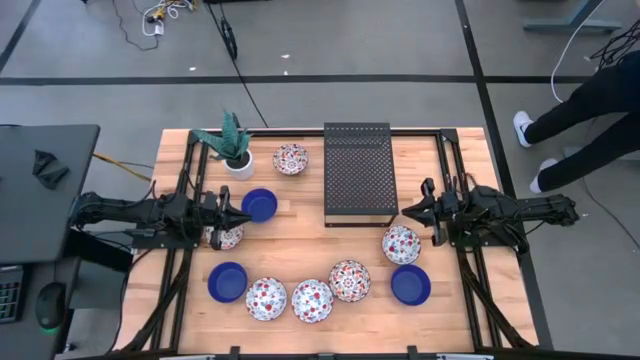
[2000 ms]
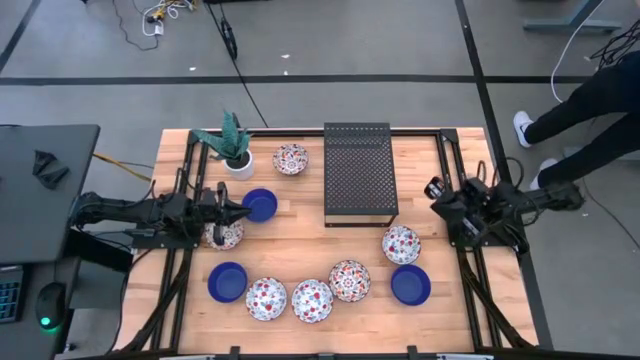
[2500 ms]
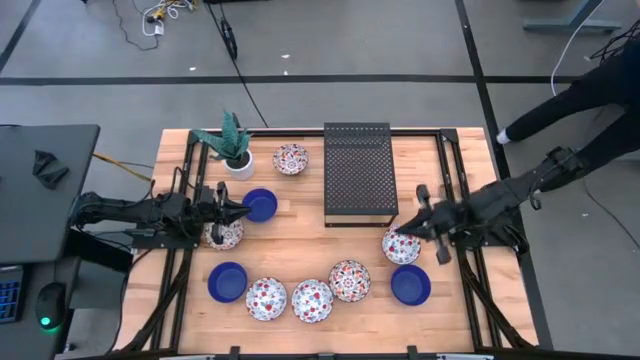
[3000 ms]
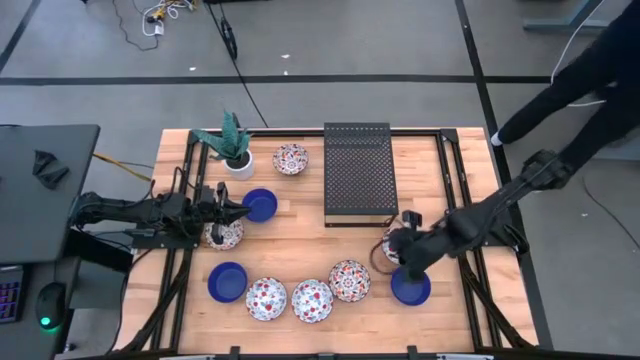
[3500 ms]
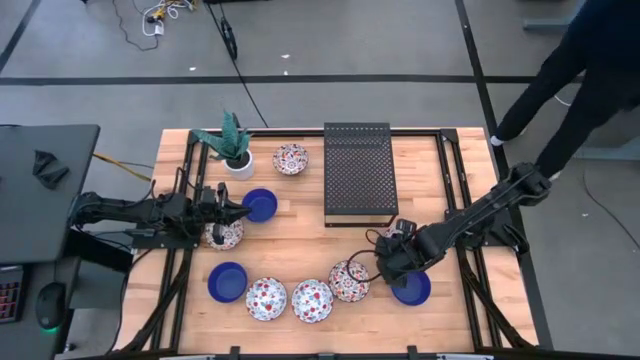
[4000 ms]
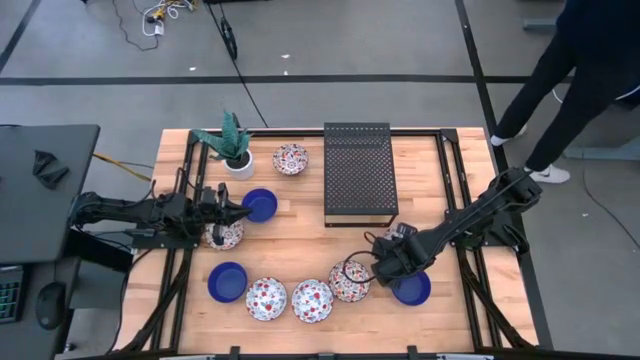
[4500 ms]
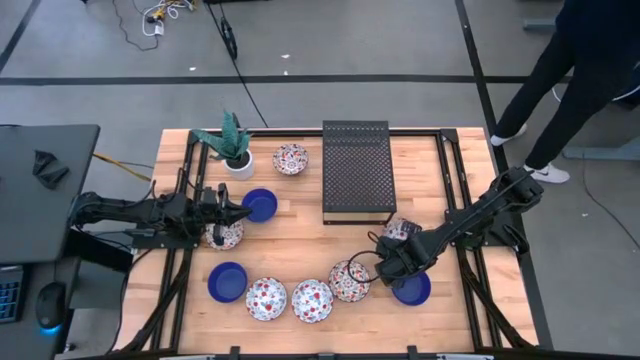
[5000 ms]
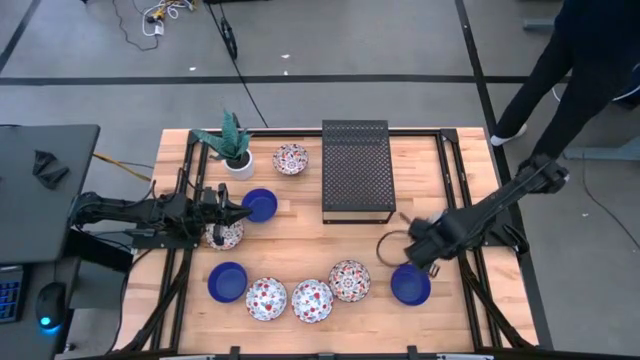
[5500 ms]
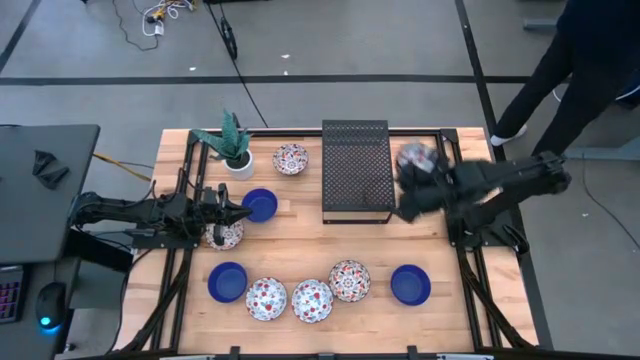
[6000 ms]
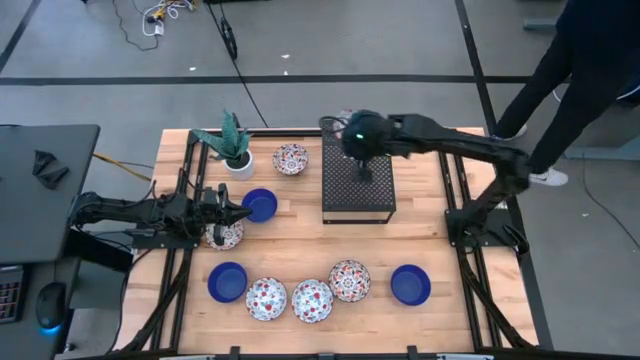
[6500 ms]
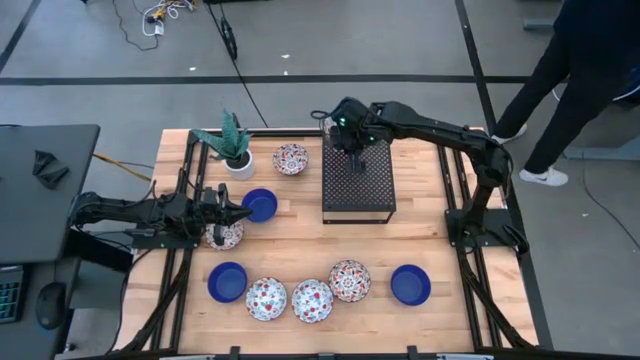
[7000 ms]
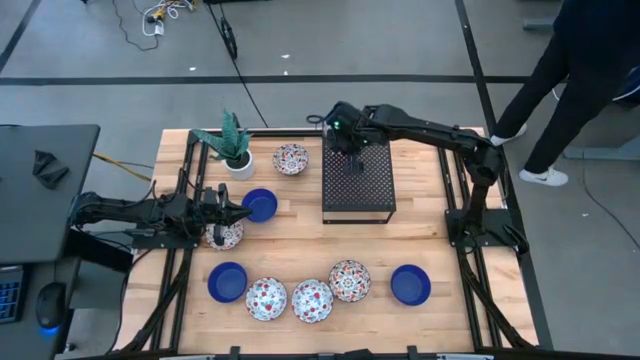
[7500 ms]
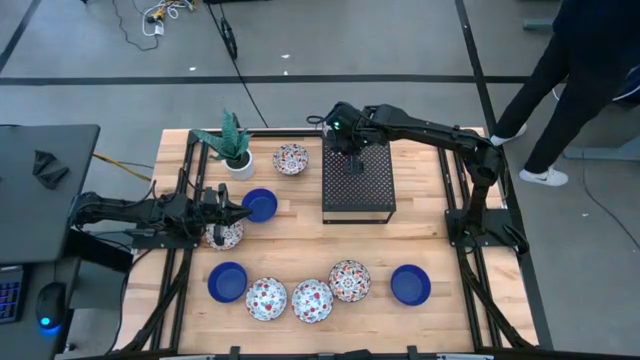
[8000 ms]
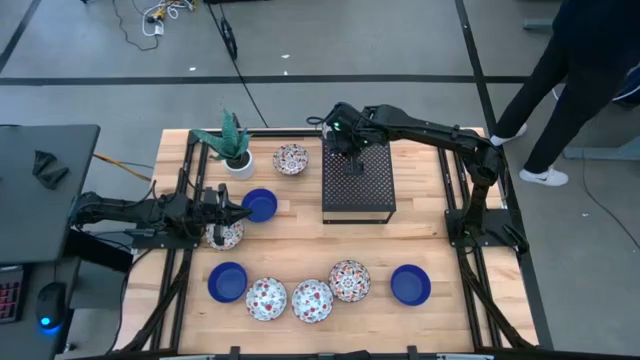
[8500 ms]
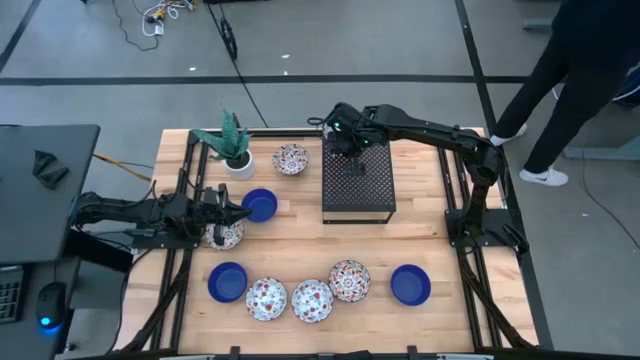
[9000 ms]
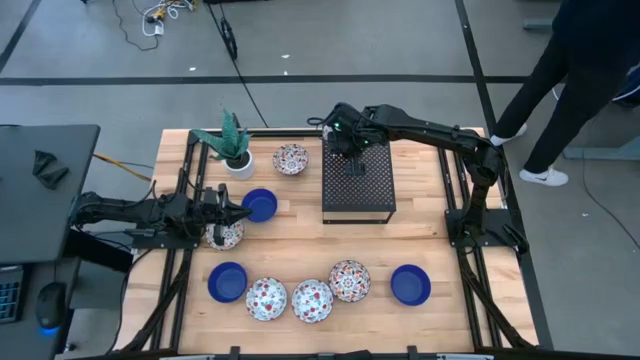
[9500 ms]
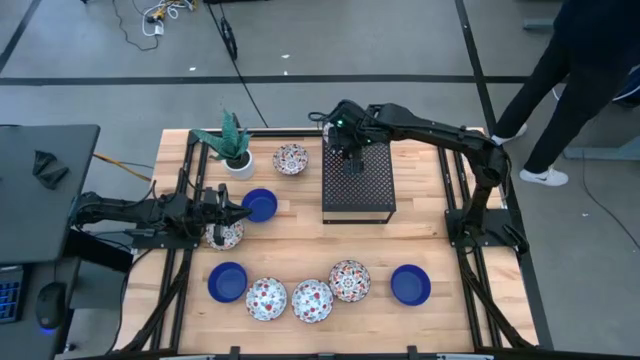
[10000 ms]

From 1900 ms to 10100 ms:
Task: Pick & Place Mini bowls
Put the right red white bowl on the shelf

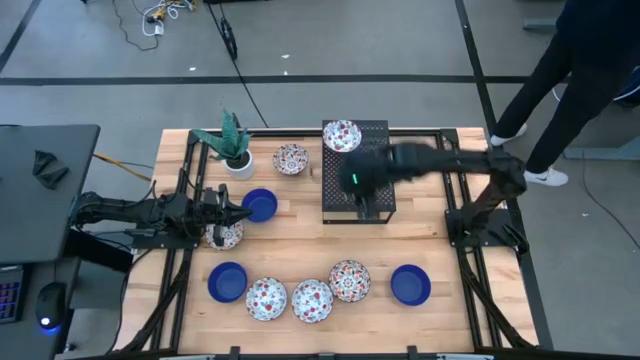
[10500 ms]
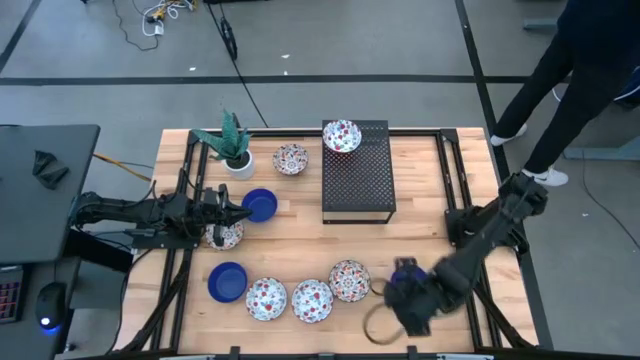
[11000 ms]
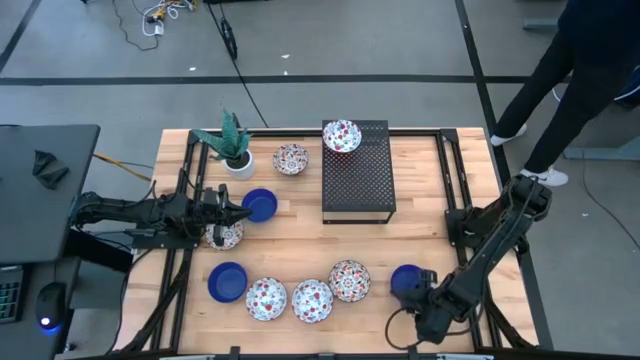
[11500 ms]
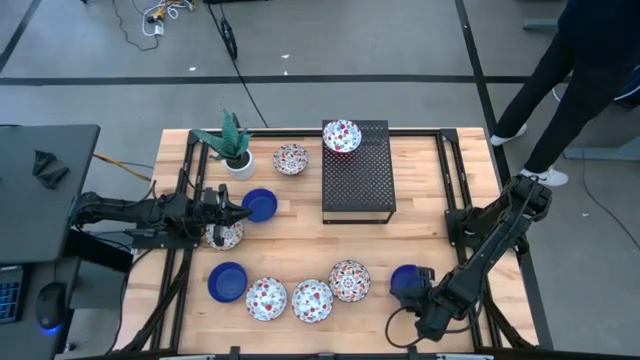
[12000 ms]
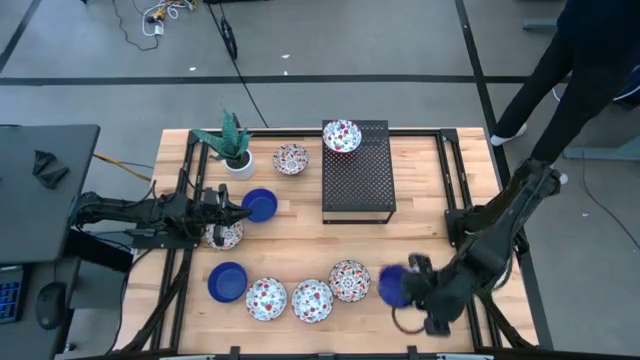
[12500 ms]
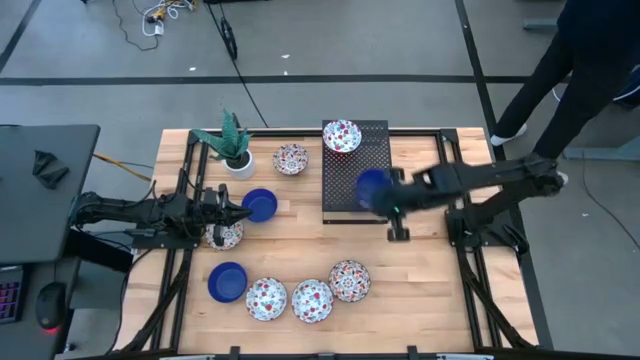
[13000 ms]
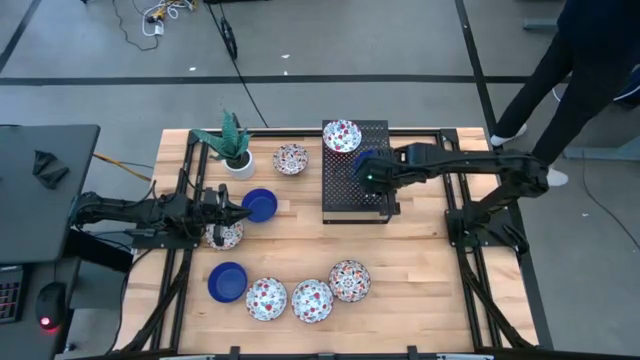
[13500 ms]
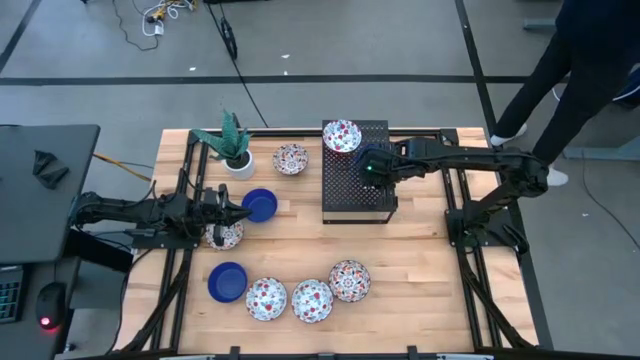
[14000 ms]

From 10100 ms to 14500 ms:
Put the bottom right blue bowl on the shelf

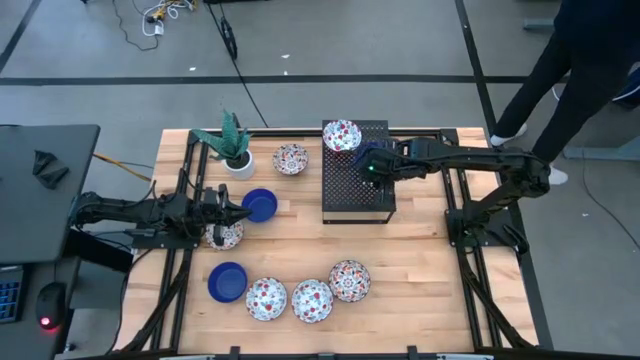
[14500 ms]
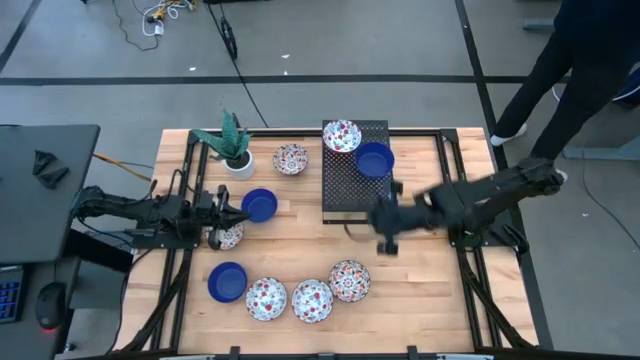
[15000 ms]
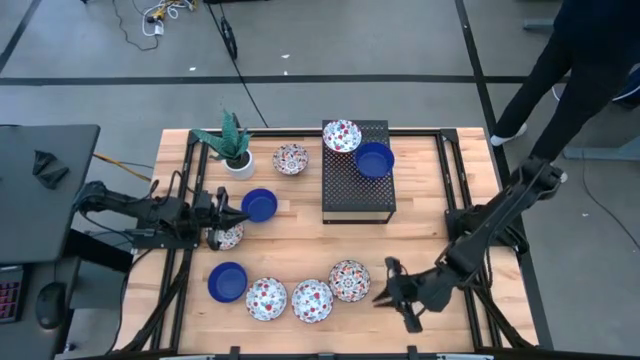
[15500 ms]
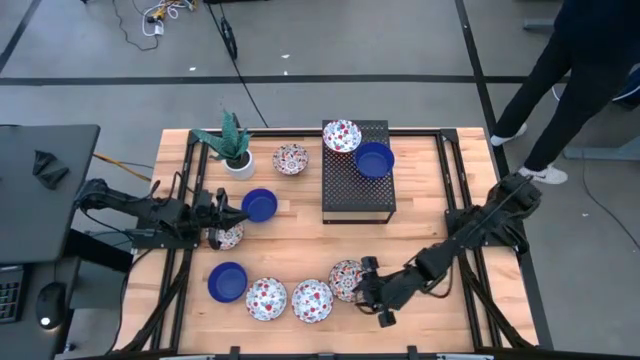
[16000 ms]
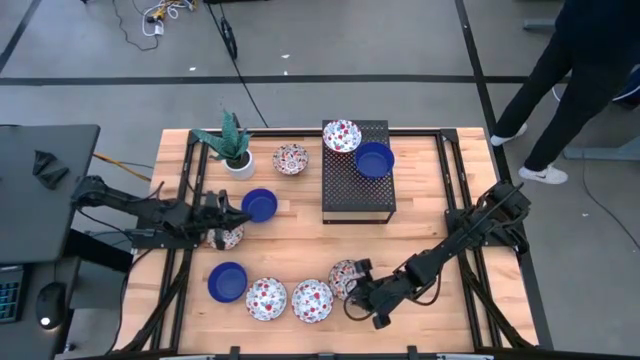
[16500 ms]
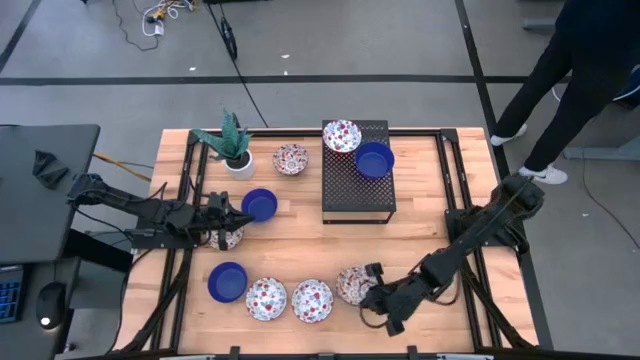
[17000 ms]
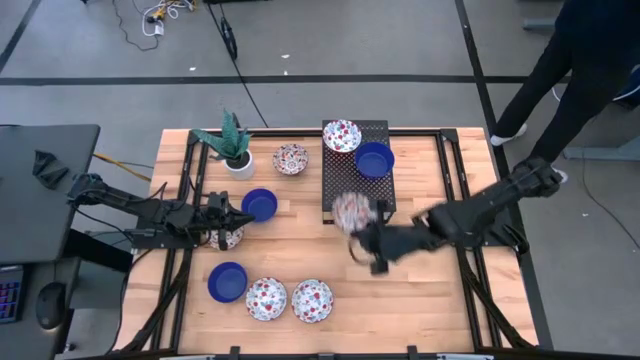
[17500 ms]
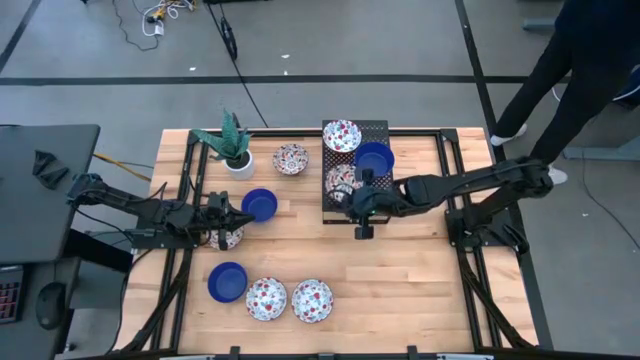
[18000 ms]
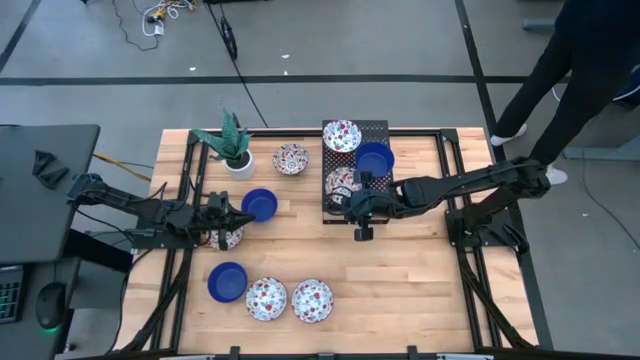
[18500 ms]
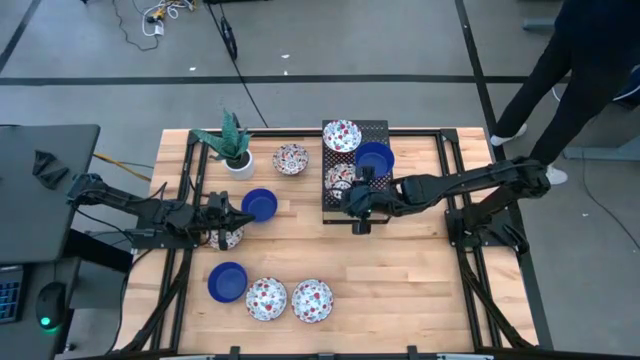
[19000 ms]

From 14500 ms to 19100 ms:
Put the bottom orange white bowl on the shelf

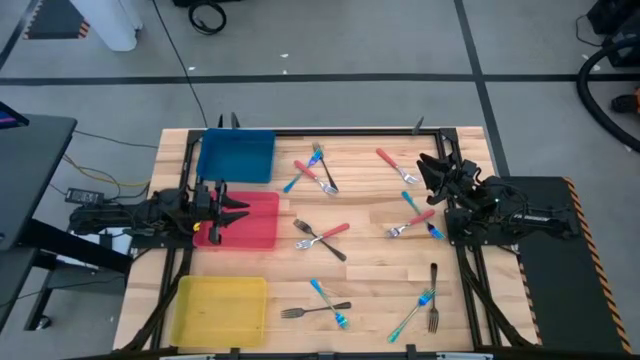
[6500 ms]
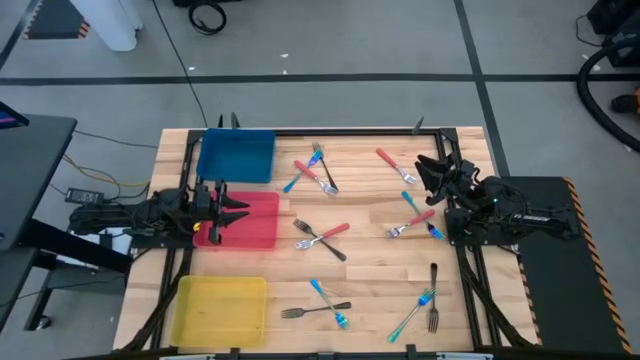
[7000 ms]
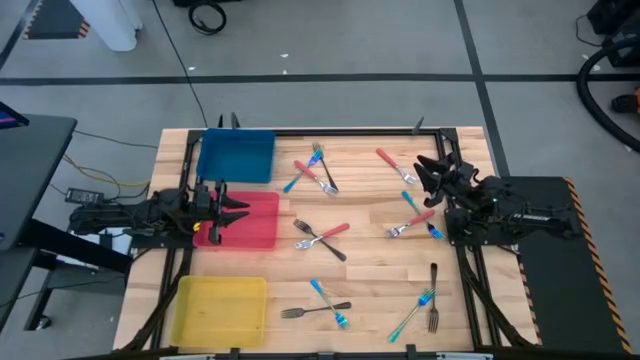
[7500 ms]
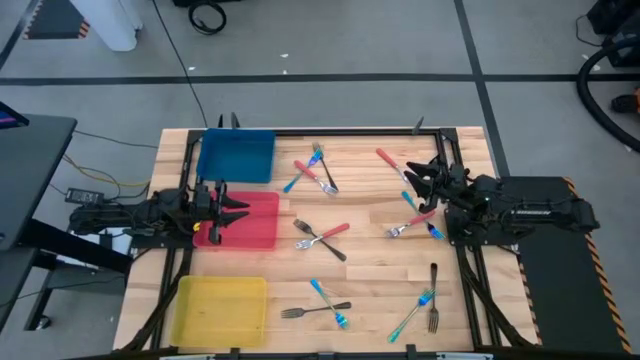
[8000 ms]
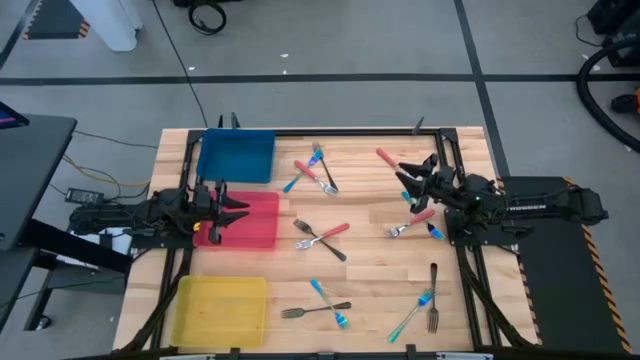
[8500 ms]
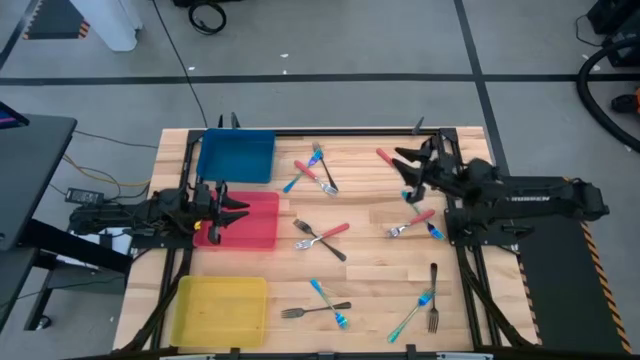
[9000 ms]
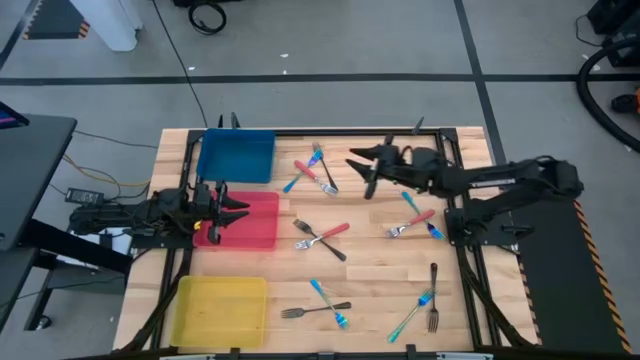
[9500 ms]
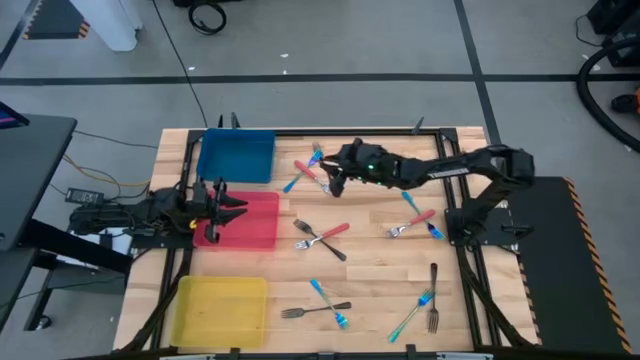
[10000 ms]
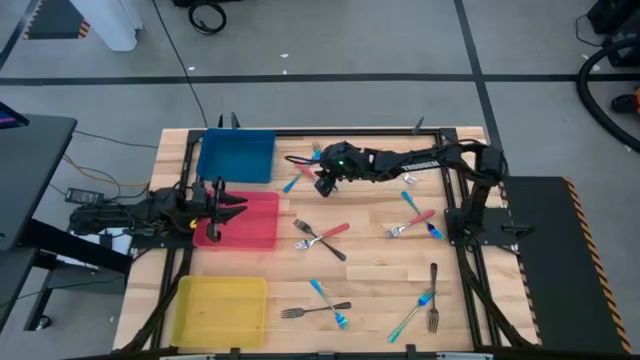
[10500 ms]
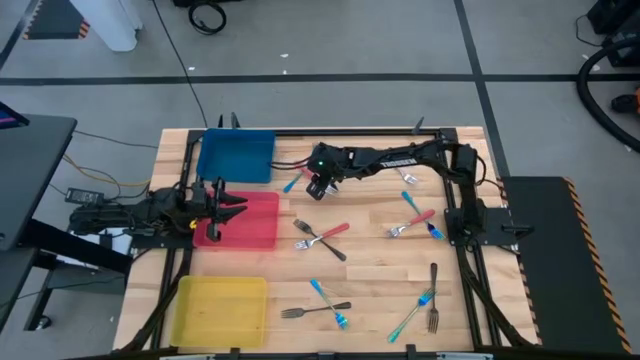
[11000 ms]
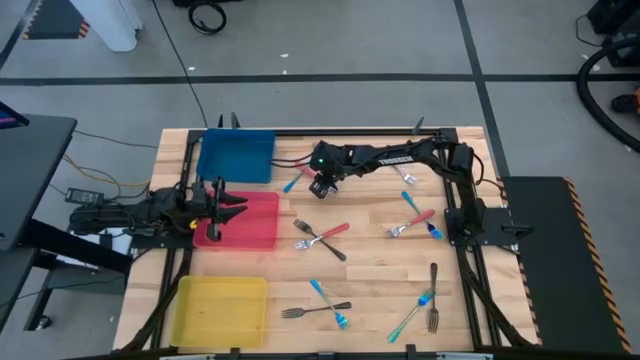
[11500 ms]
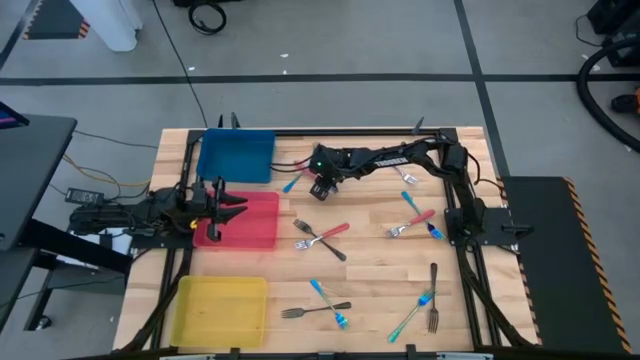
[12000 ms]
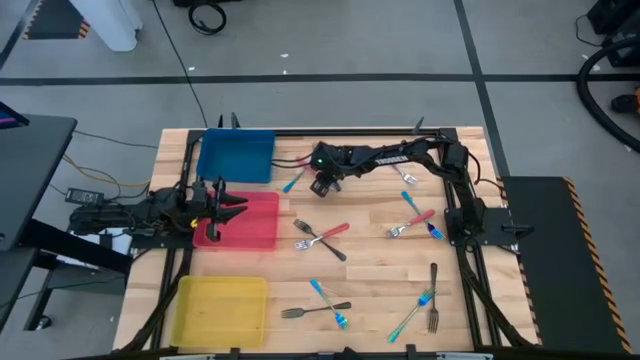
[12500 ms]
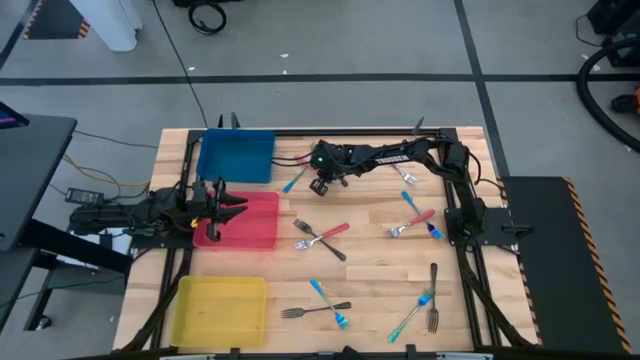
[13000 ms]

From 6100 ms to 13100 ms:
Task: Sort silverware by color (type)
Put the top left pink fork into the blue bin
